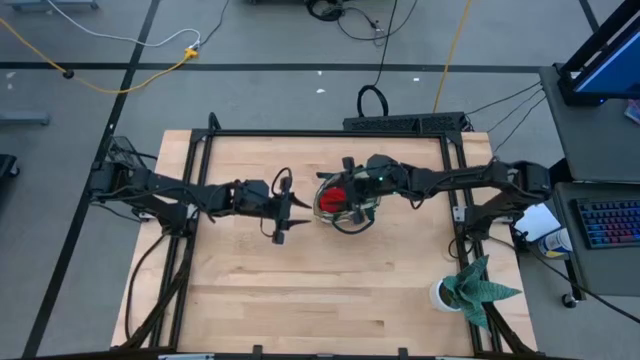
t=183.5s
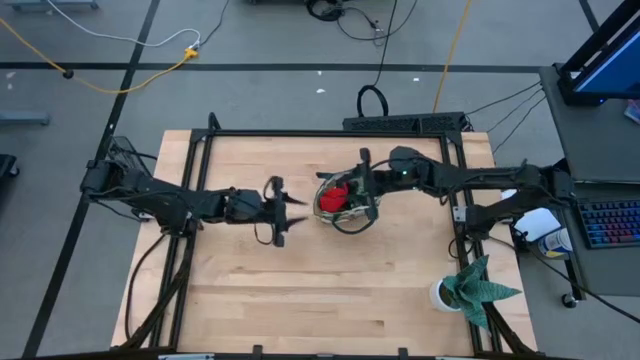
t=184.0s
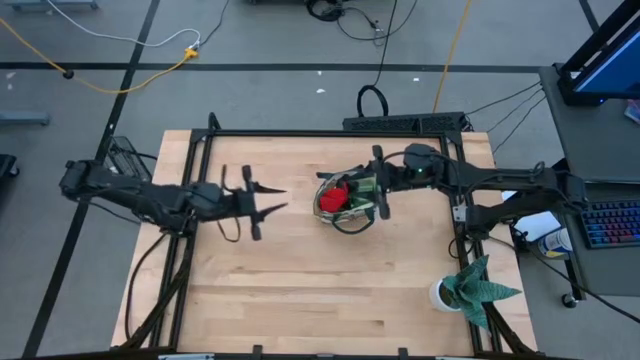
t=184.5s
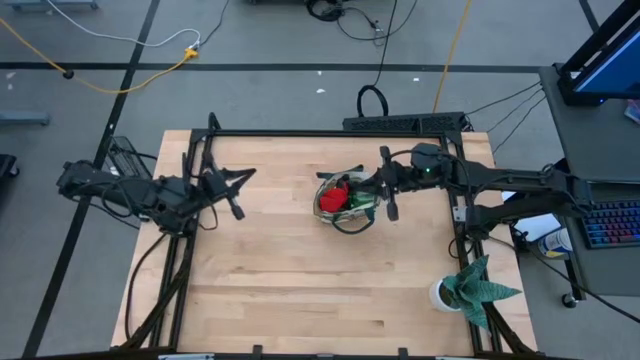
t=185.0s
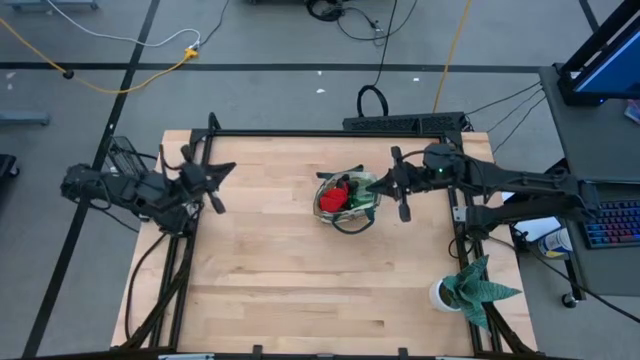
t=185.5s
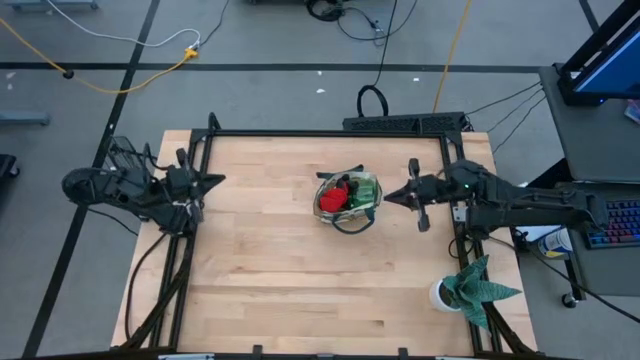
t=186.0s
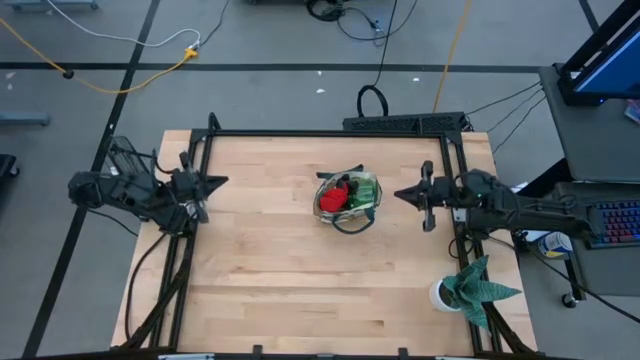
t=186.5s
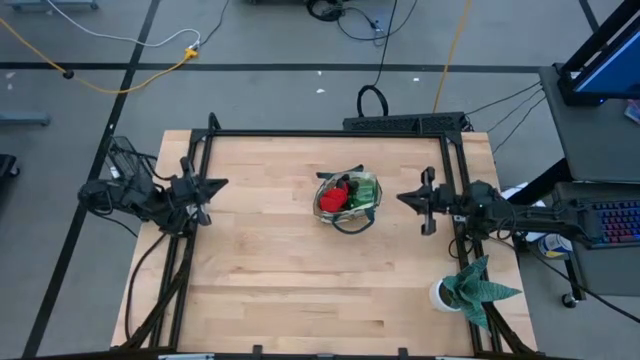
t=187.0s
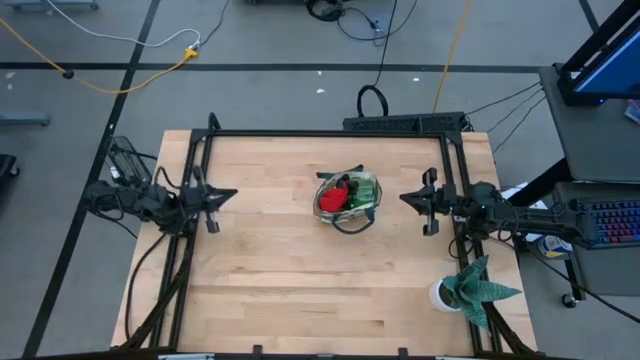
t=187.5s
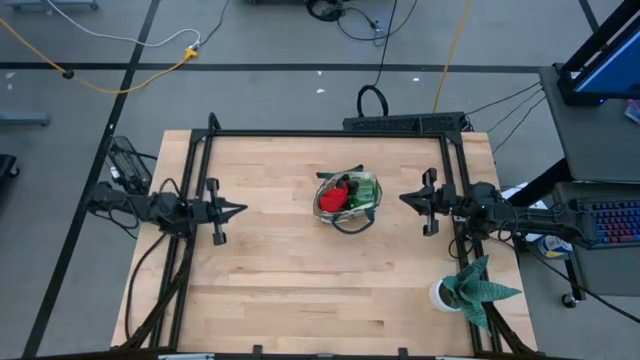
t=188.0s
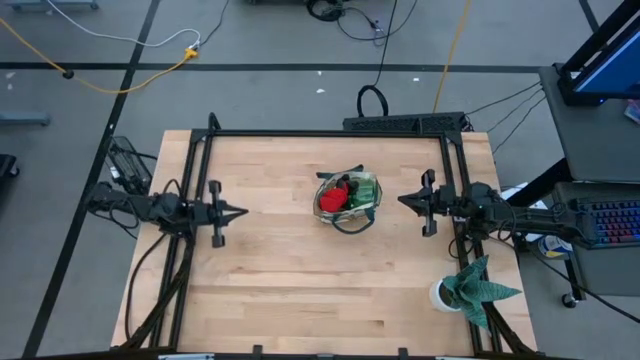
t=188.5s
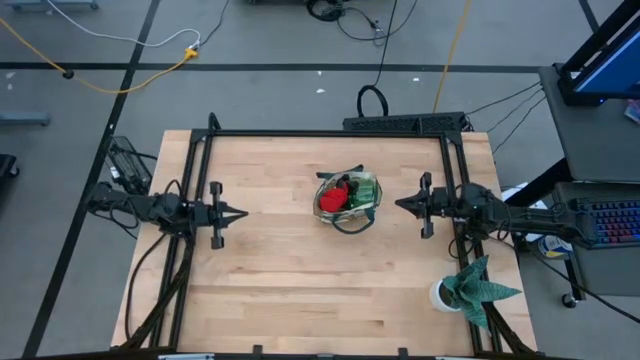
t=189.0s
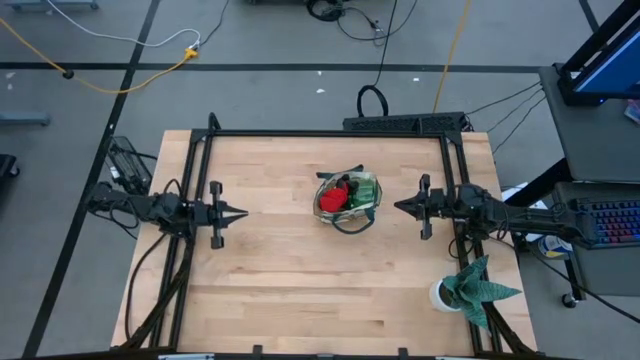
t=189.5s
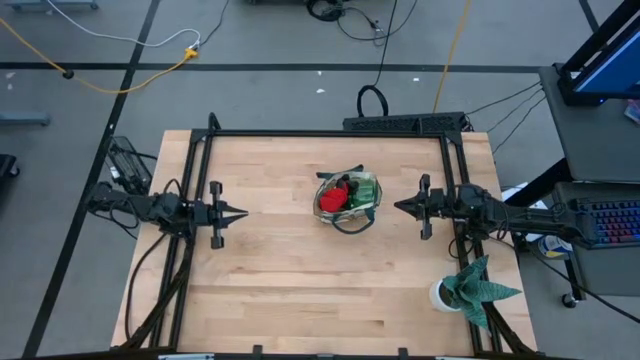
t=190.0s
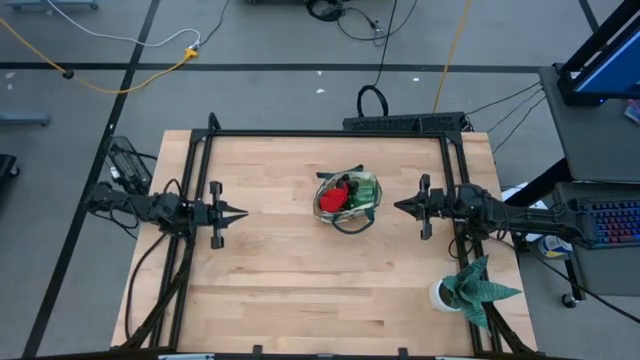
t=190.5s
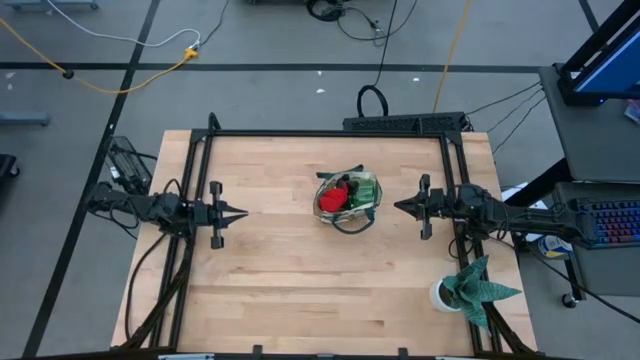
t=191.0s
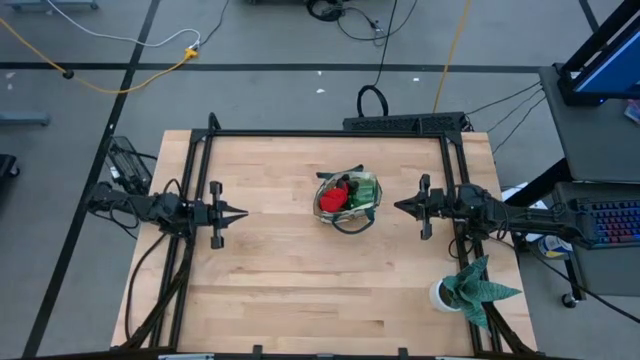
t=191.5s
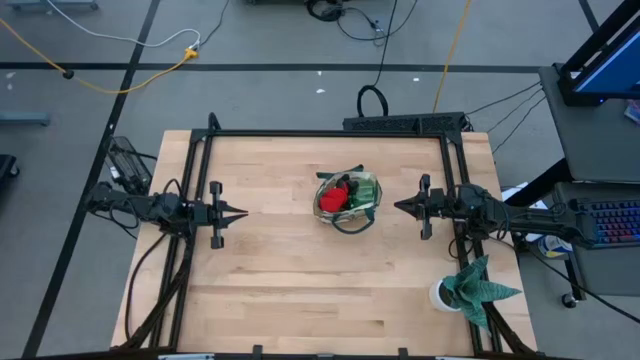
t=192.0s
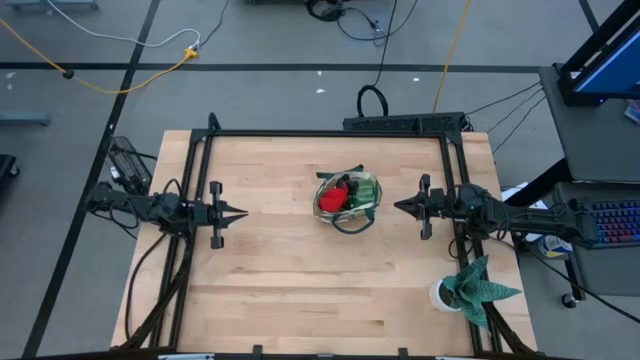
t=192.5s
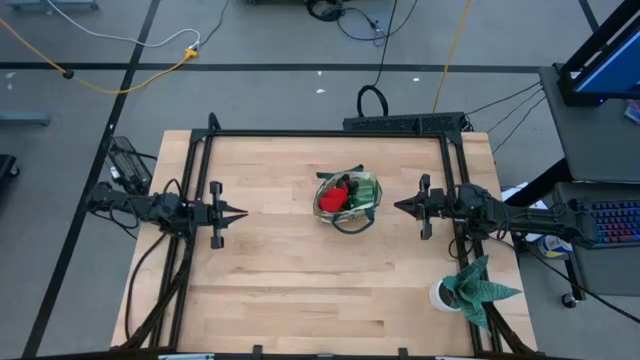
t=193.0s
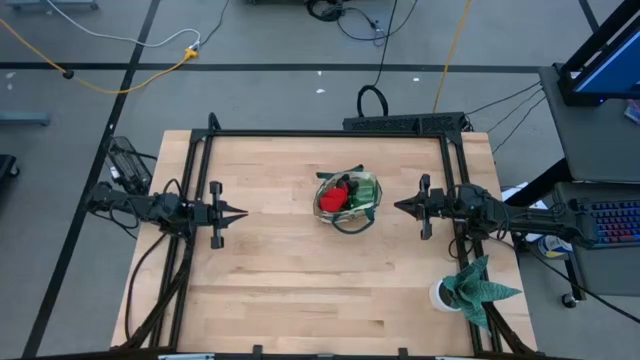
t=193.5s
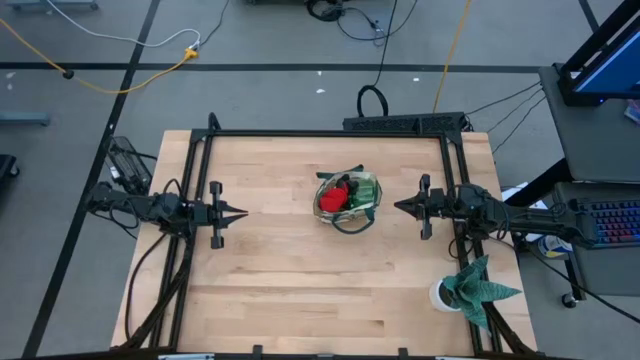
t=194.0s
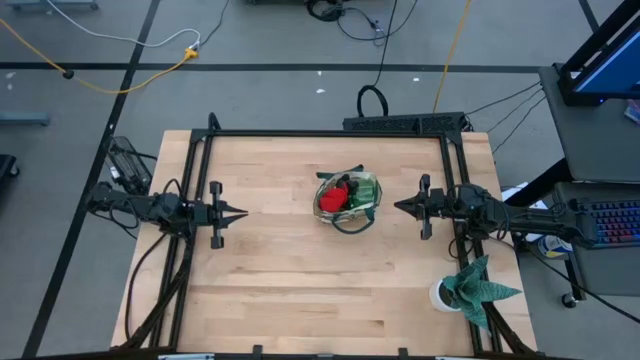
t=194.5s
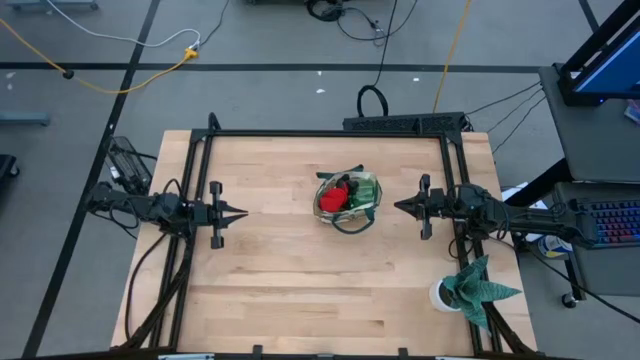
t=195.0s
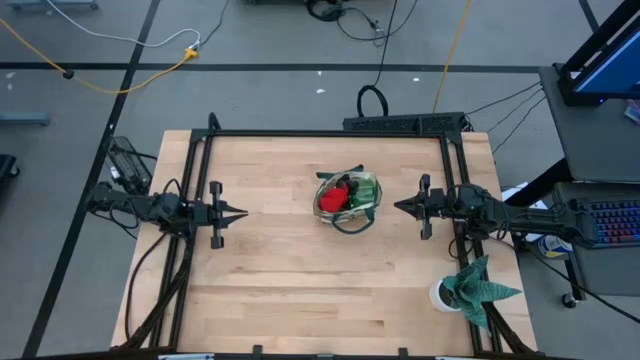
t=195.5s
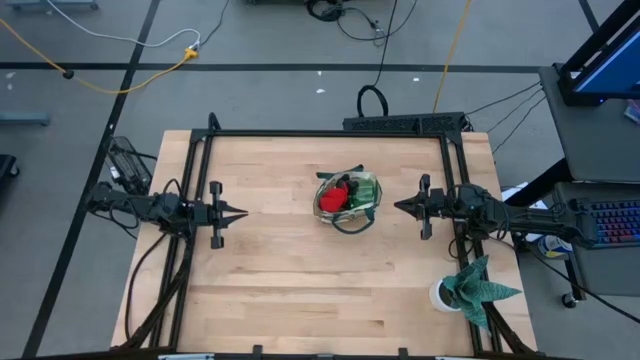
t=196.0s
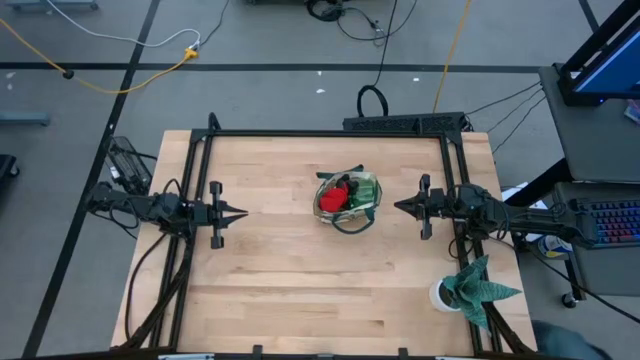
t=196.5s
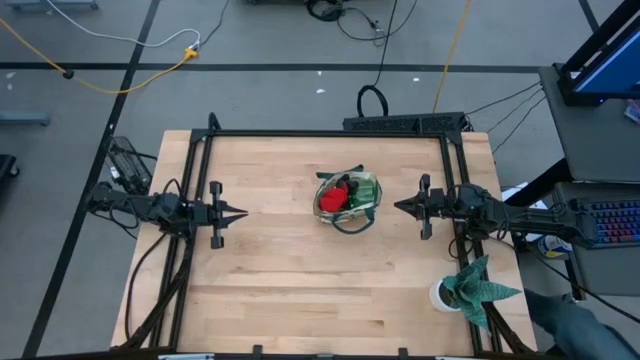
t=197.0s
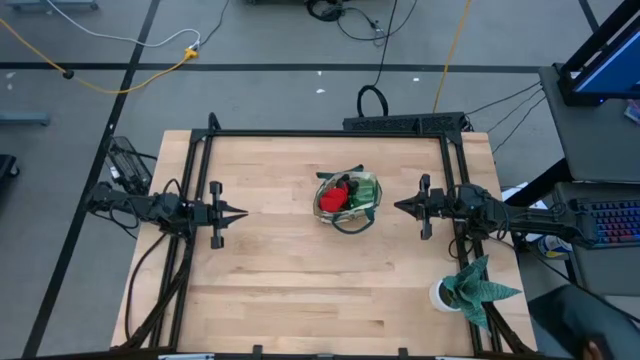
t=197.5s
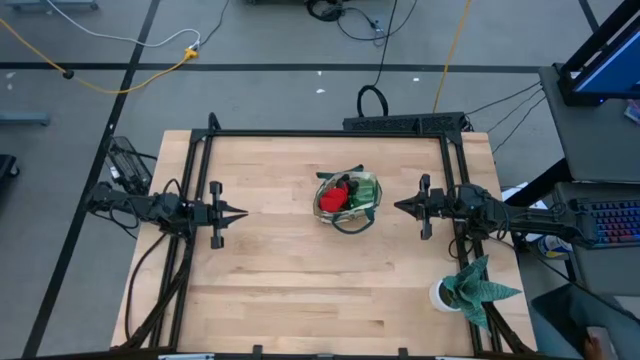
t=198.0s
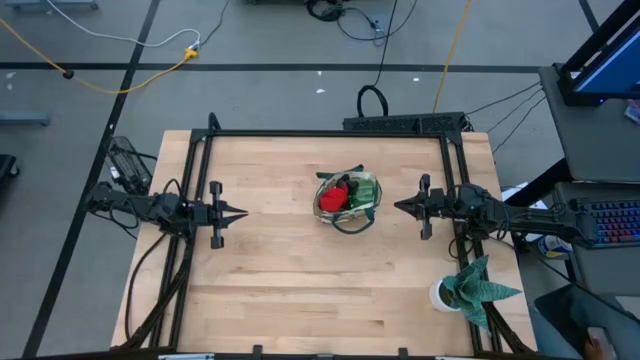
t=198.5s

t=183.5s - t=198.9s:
Task: Pick & Place Garden tools in Gardening bag
Return to Home Position

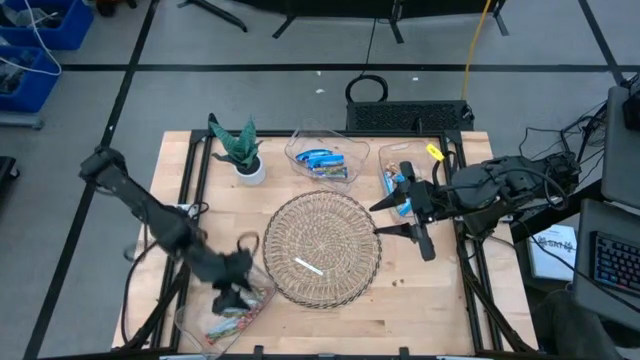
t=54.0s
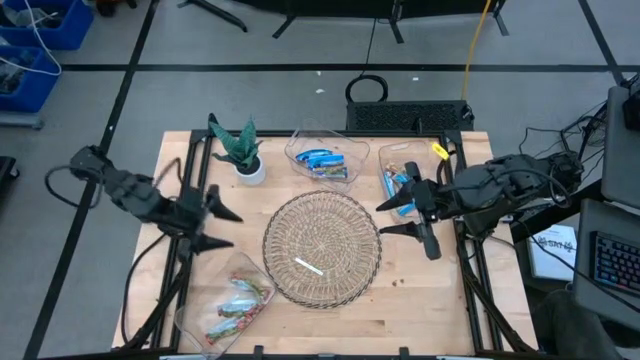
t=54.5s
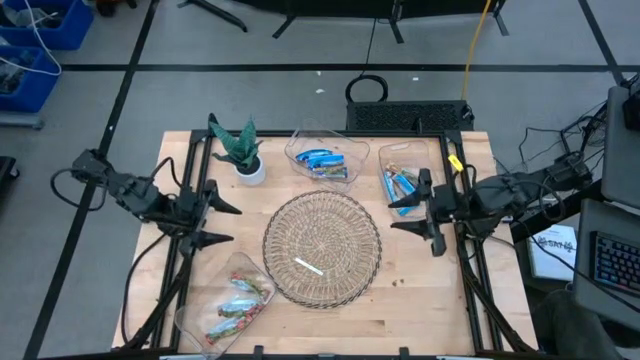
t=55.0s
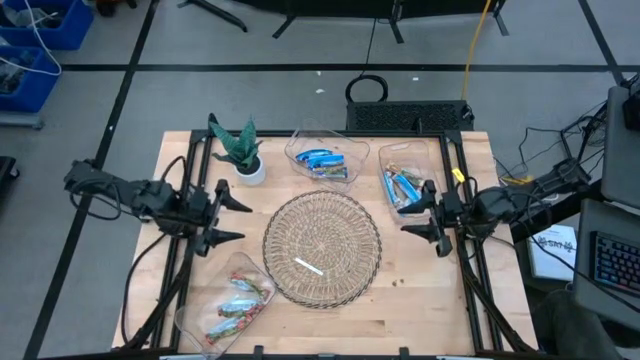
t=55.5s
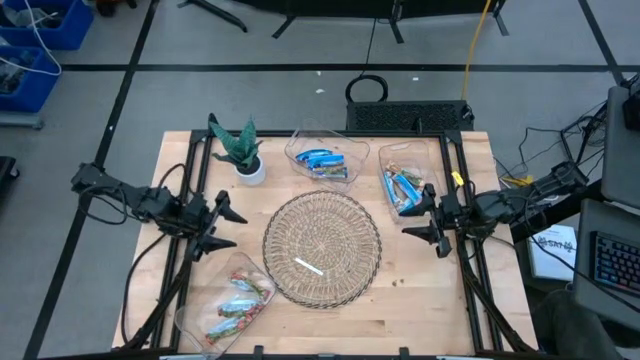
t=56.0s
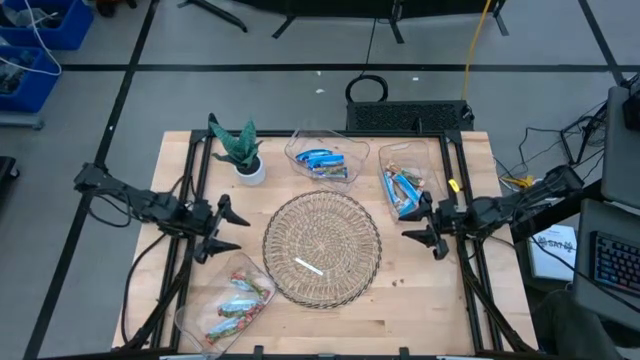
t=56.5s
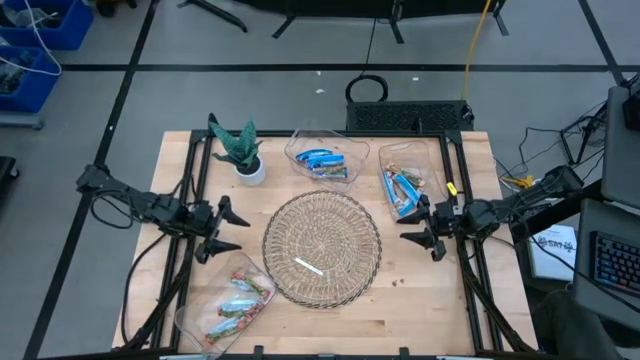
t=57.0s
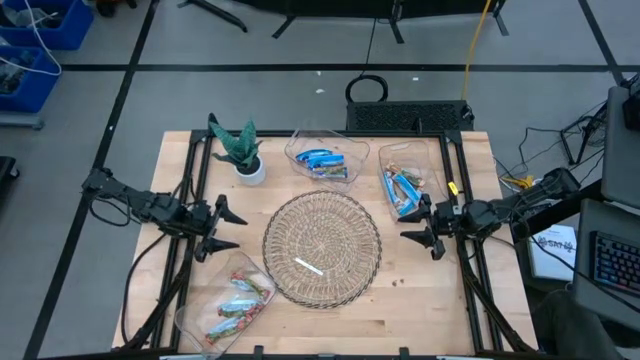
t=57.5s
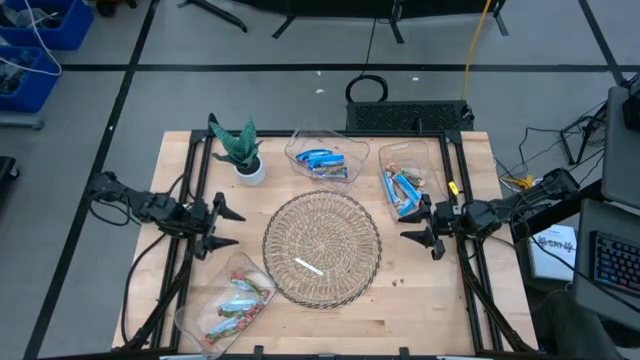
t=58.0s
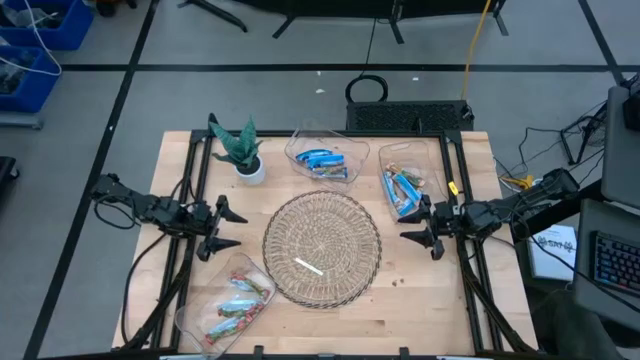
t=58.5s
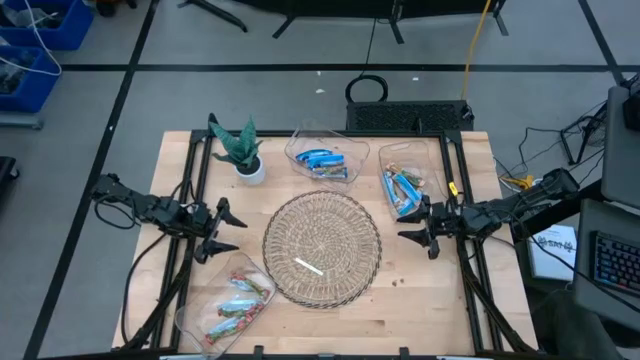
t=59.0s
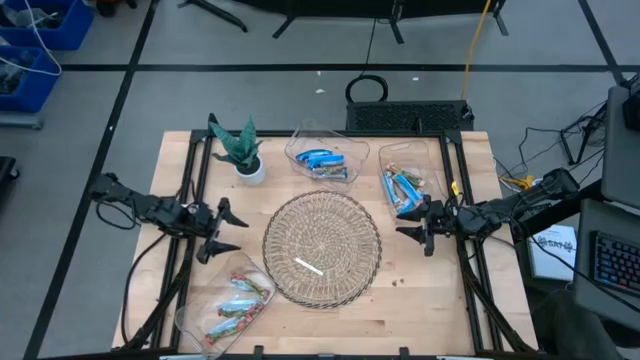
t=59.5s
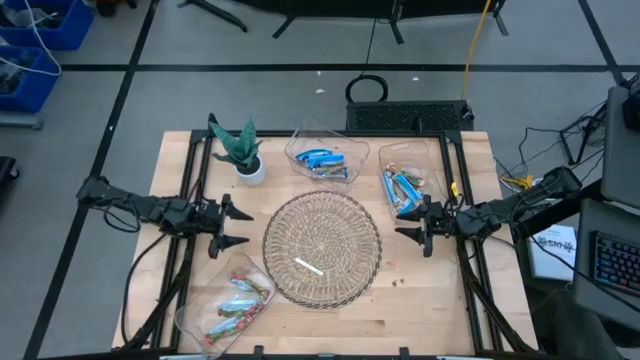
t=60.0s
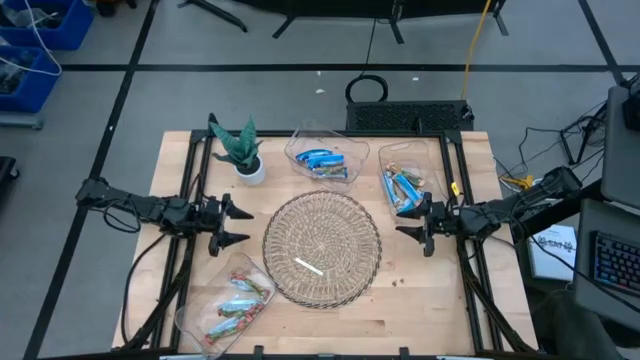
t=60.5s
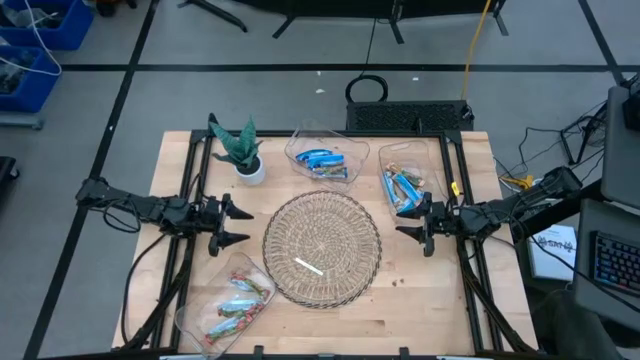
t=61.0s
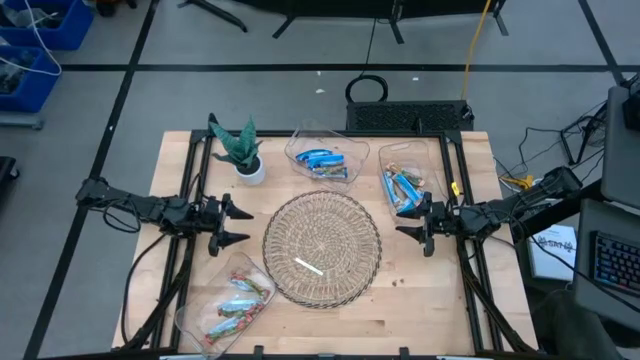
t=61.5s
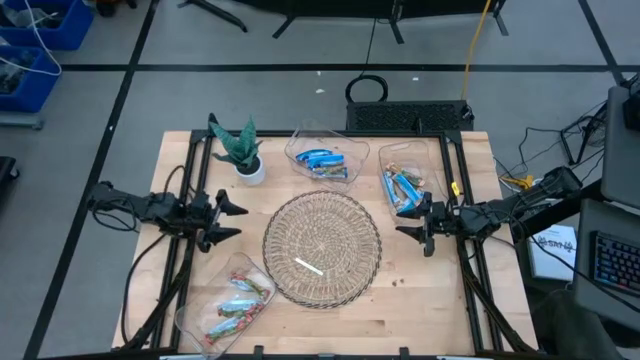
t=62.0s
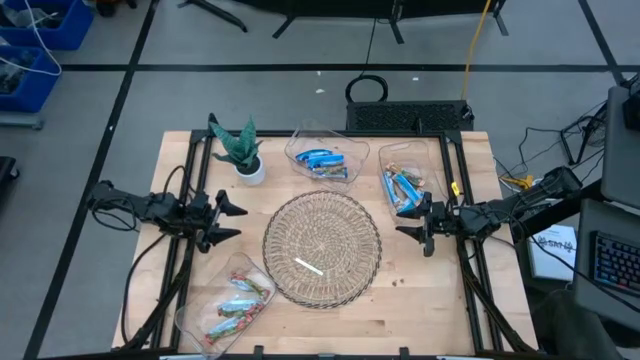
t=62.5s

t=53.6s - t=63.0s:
Task: Pick and place Granola Bars by type
Return to Home Position
